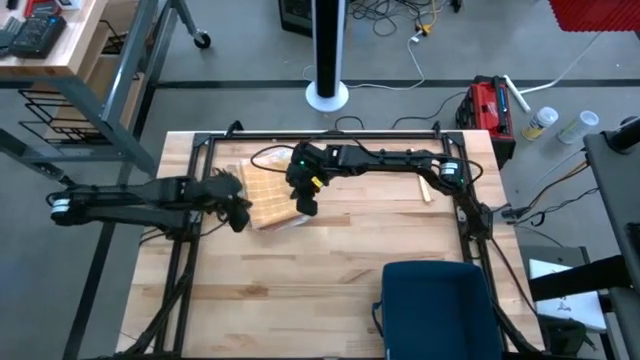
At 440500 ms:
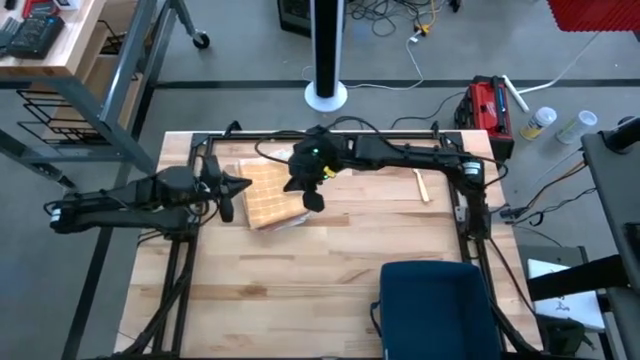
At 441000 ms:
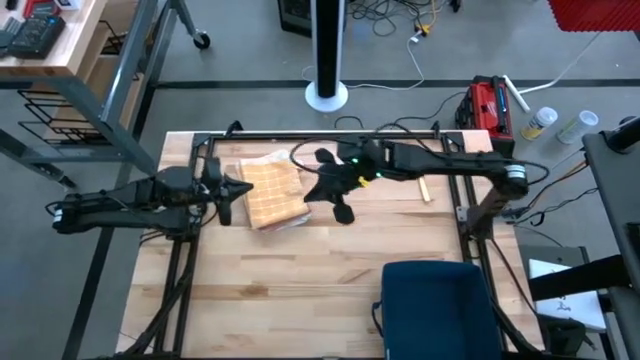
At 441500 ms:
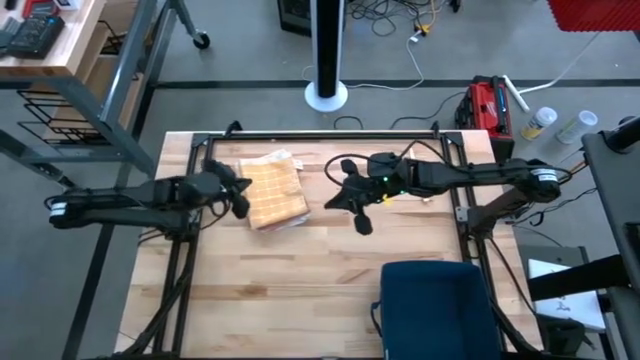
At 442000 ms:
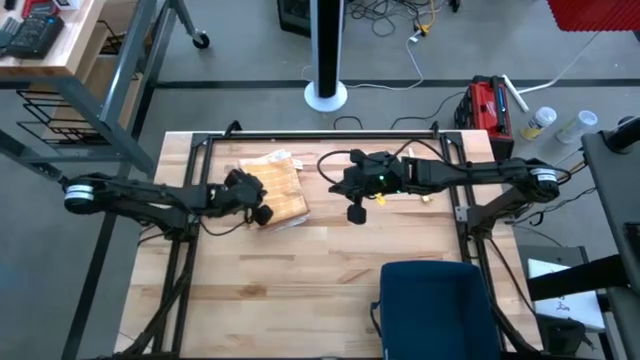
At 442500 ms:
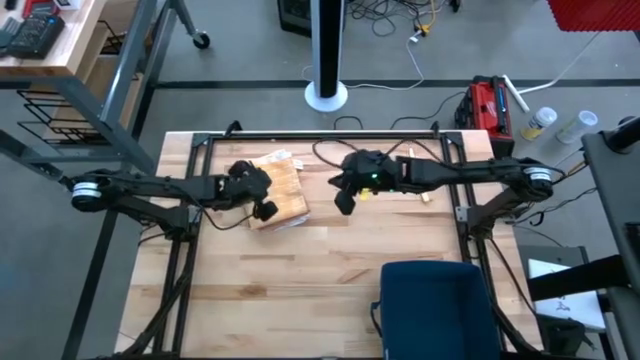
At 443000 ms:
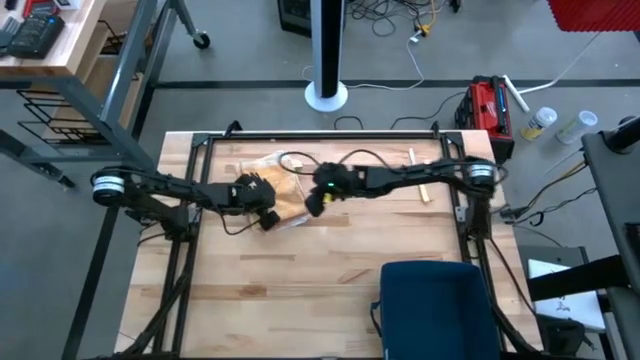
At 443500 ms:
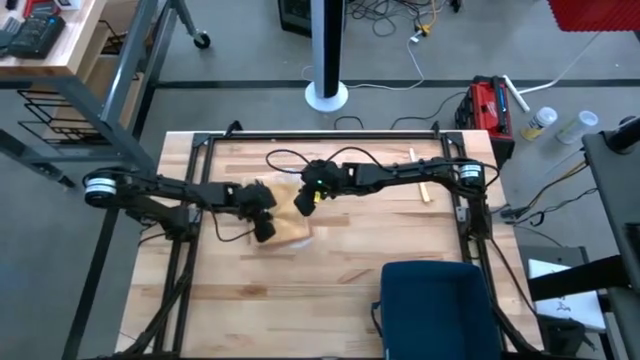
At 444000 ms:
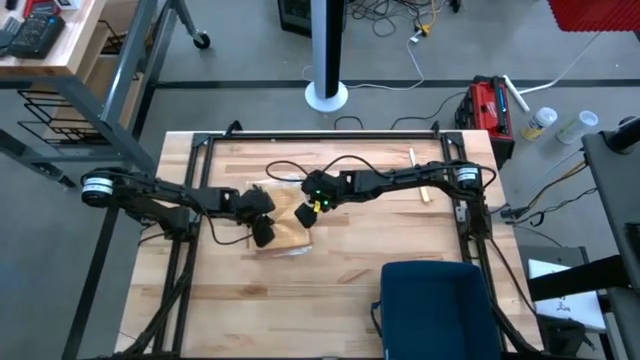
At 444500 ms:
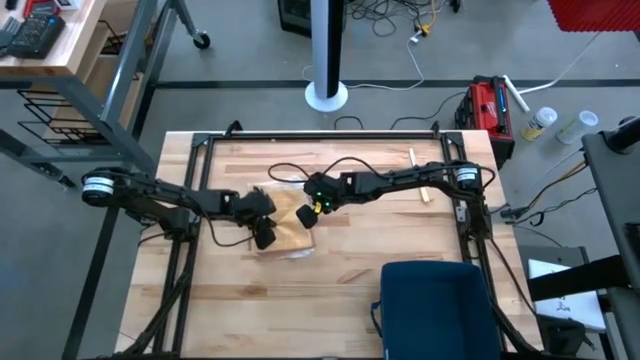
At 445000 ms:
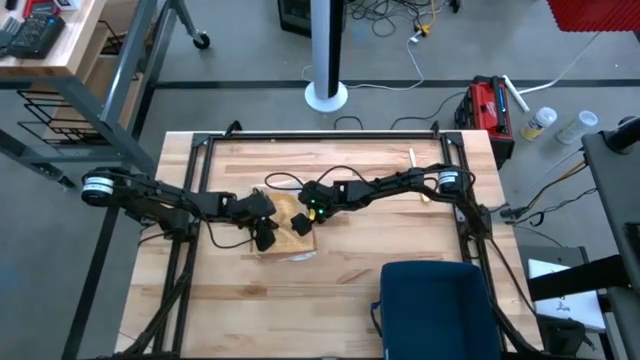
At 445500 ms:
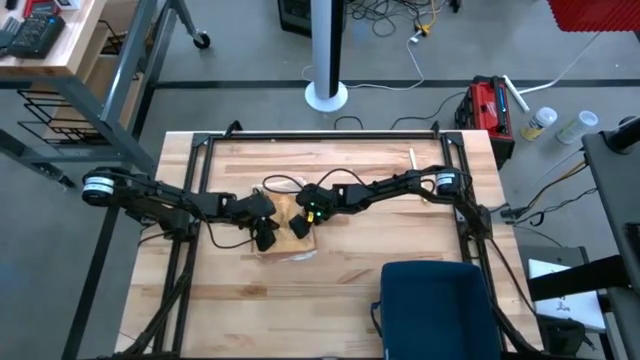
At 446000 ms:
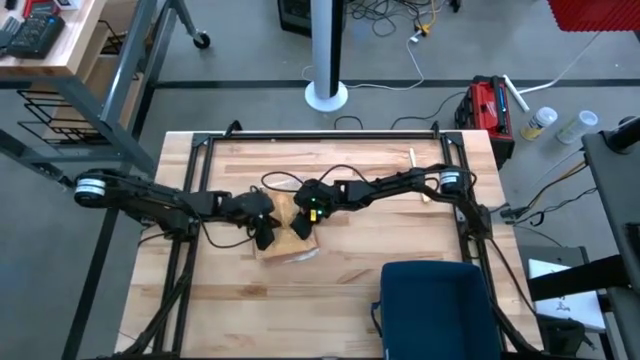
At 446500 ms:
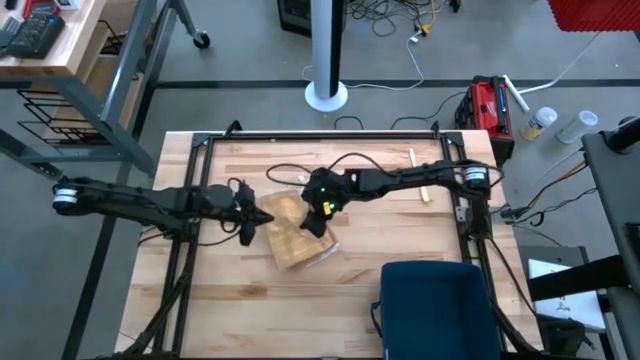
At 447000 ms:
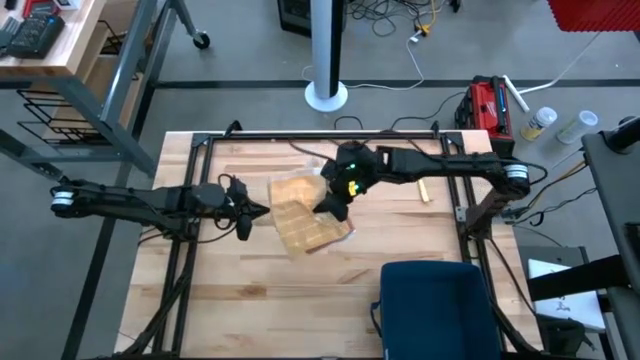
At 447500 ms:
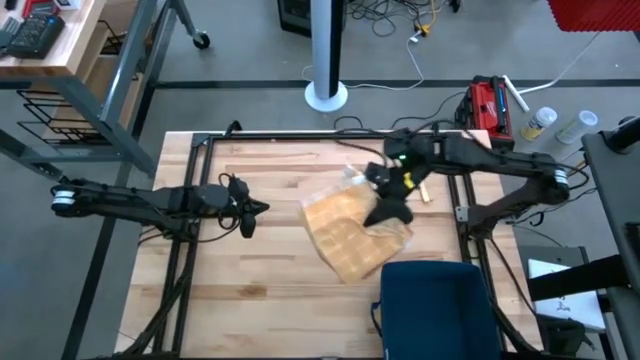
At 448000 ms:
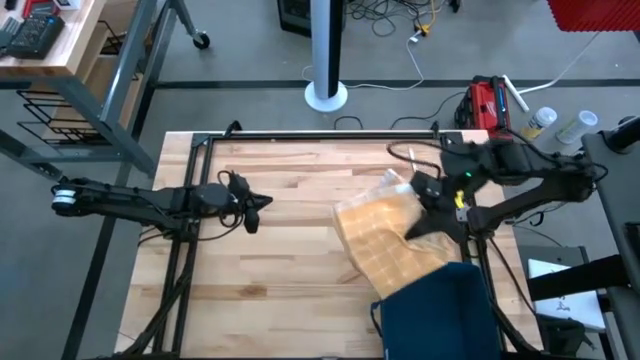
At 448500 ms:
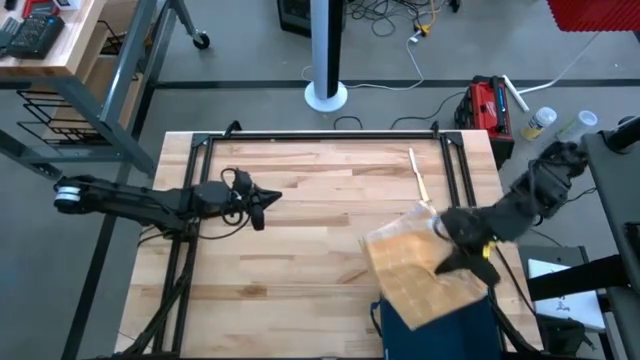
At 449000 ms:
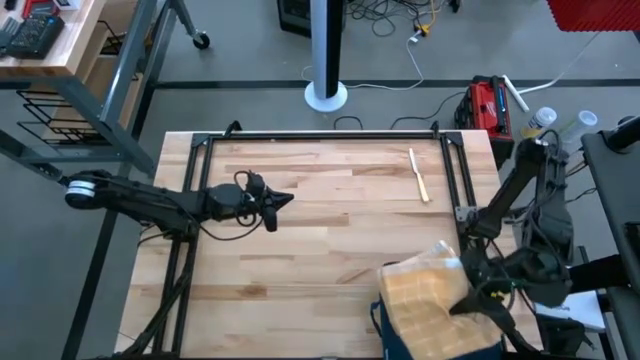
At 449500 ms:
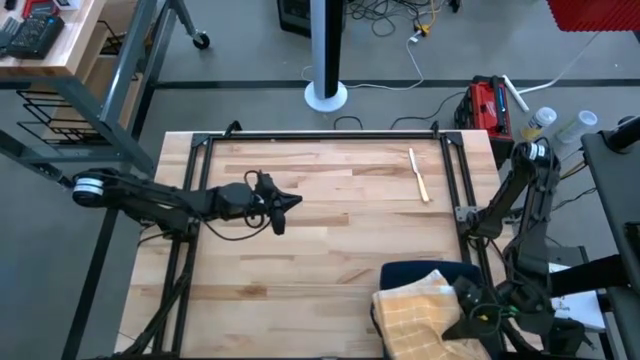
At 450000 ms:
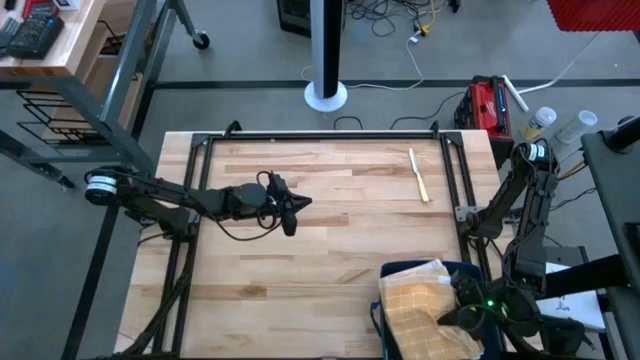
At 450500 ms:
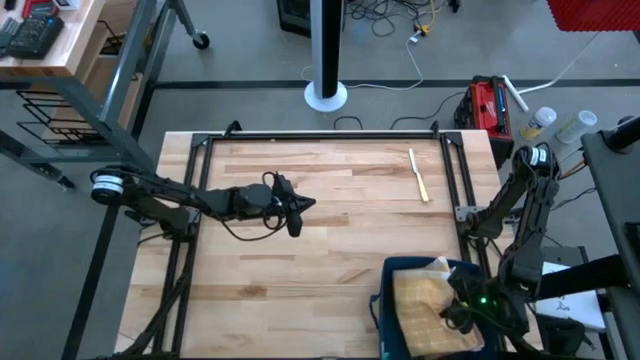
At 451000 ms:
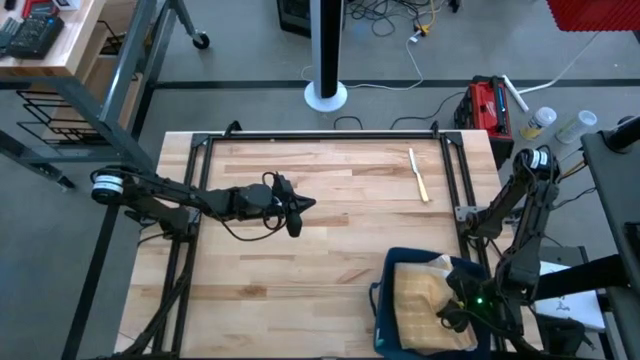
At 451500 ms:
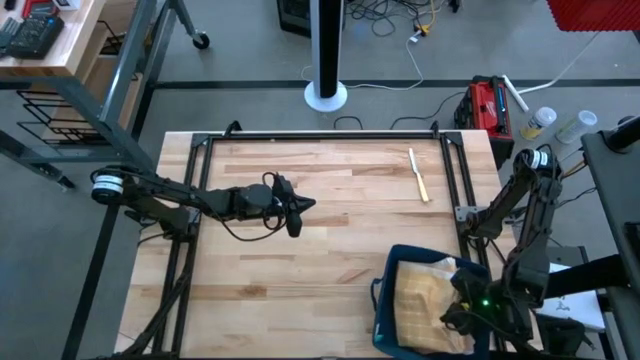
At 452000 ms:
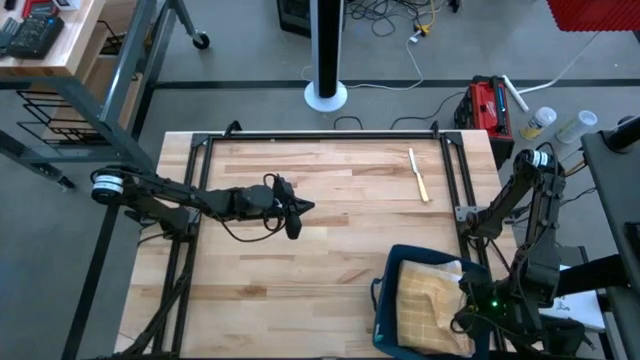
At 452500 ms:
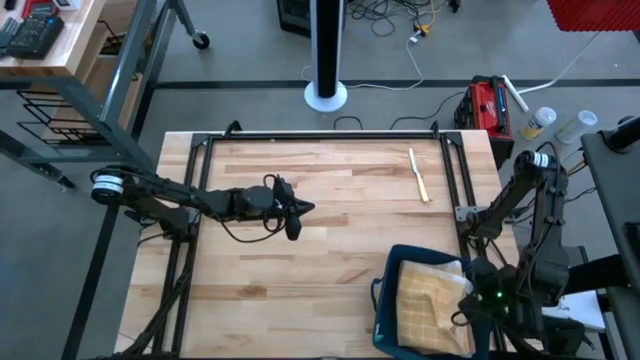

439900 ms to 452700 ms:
Task: Fold towel
Put the stacked towels into the blue bin

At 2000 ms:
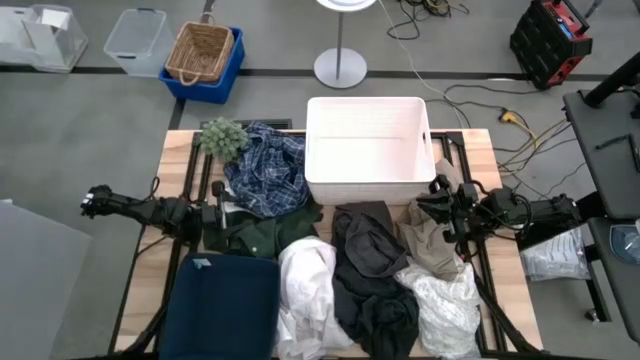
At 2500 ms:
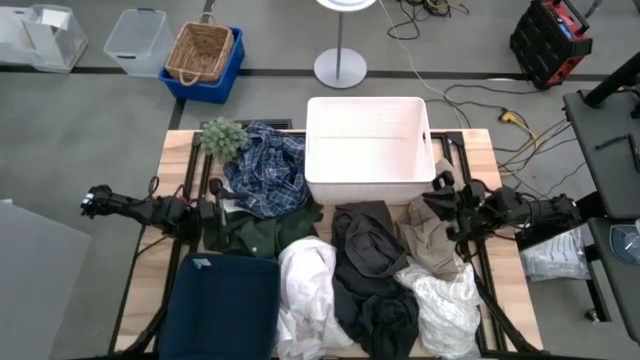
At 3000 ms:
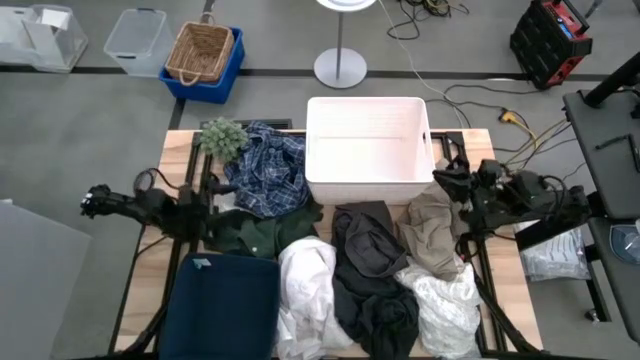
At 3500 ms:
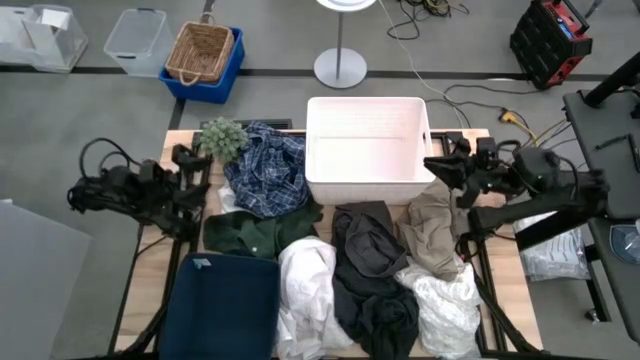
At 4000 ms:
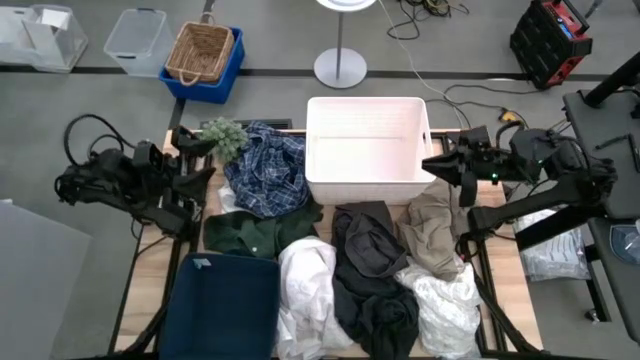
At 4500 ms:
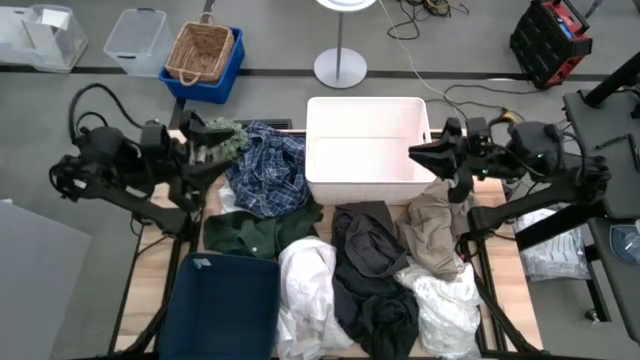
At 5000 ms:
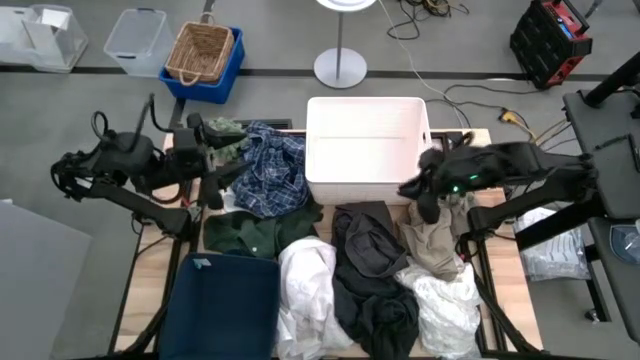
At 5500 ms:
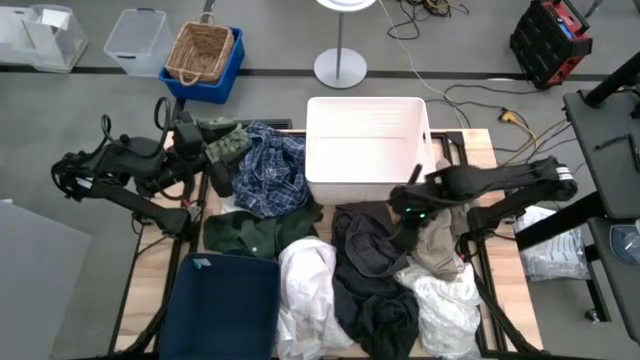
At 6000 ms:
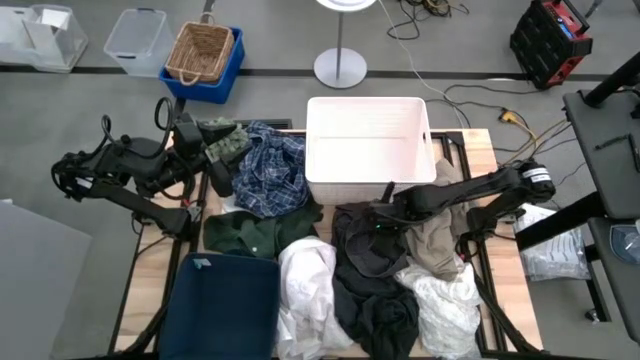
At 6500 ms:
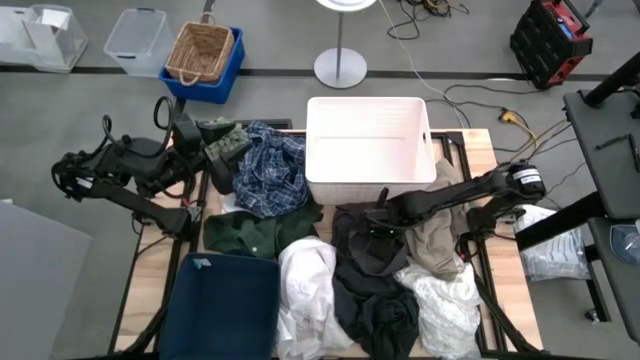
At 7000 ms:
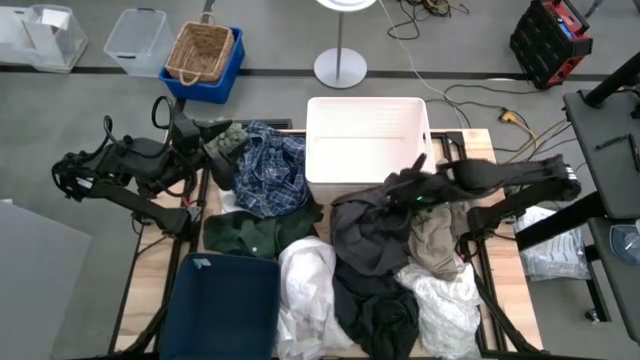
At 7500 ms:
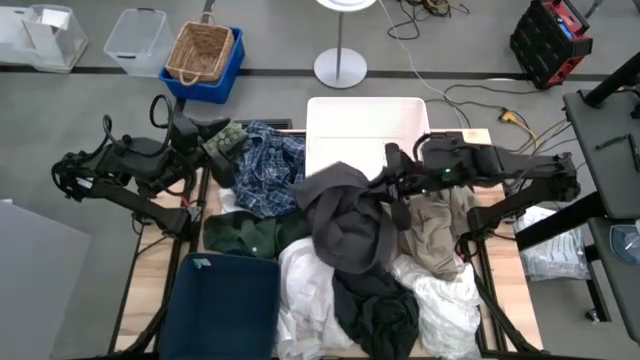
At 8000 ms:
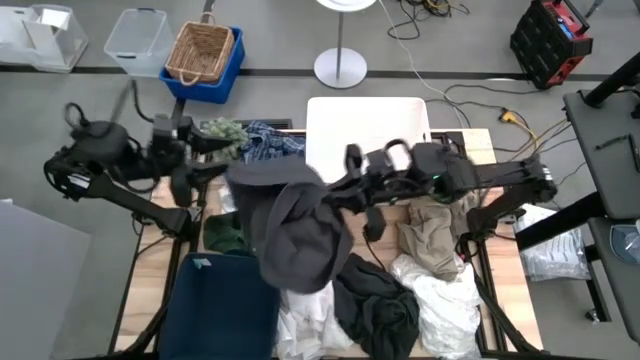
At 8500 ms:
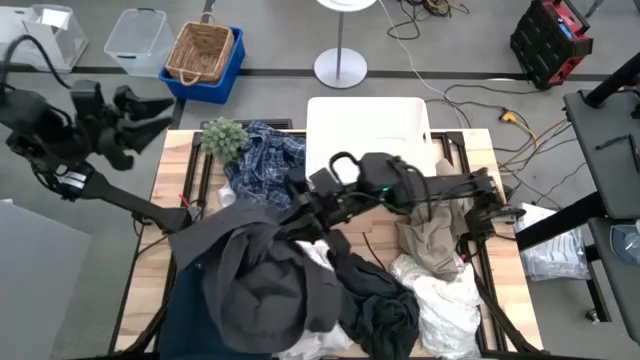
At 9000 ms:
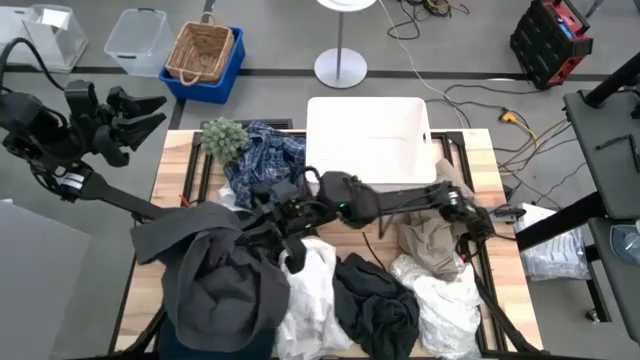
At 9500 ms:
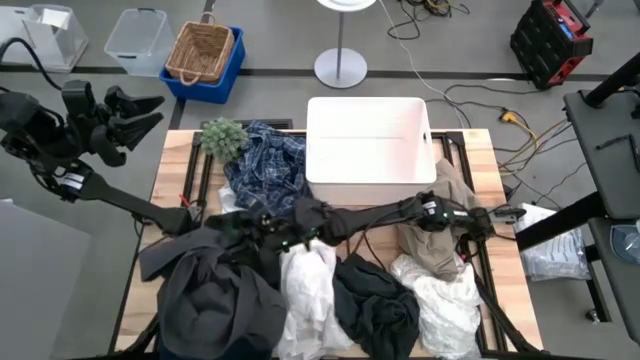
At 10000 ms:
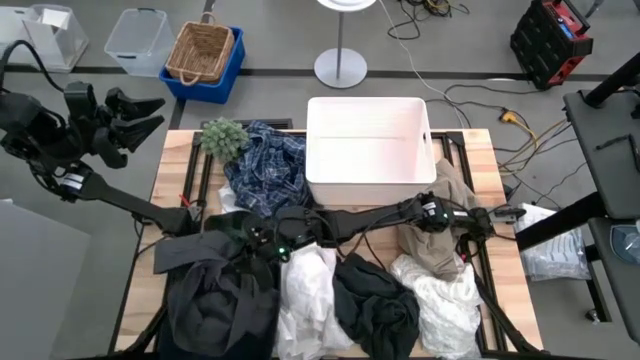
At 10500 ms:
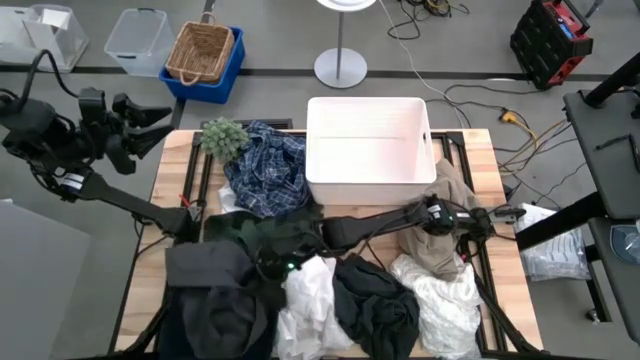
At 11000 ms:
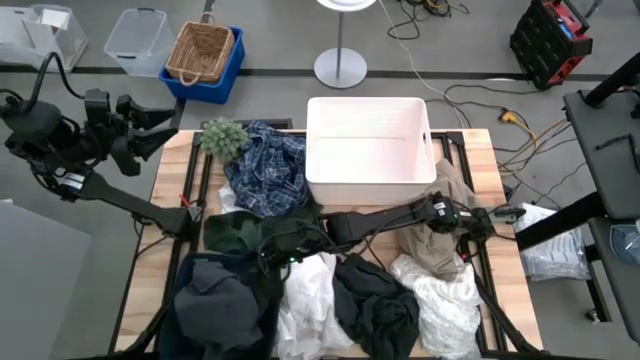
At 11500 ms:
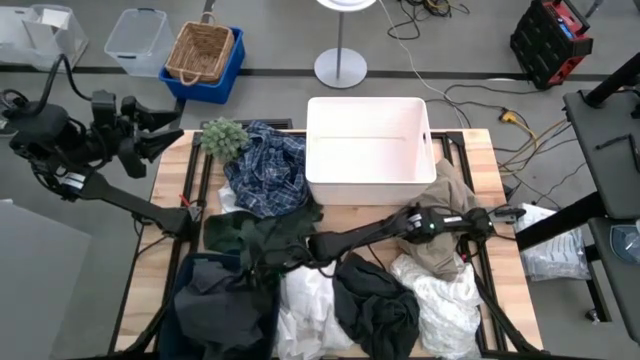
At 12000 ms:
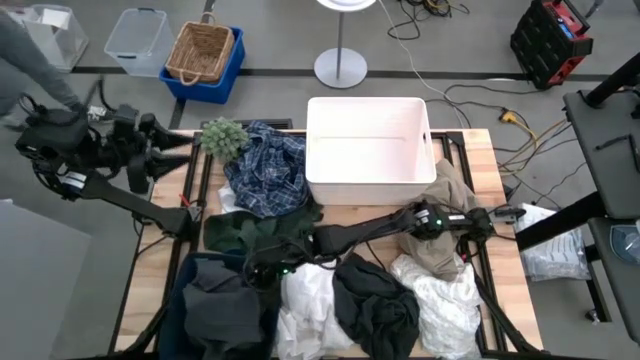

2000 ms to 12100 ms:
Task: Sort clothes
Put the light gray shorts in the blue bin
